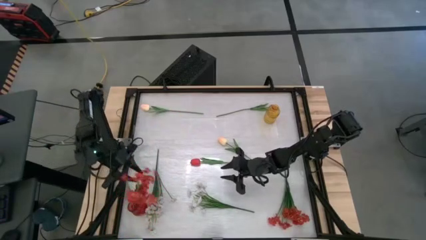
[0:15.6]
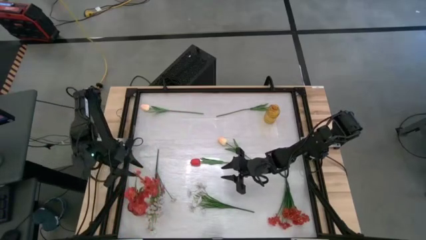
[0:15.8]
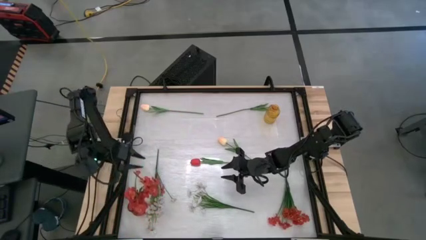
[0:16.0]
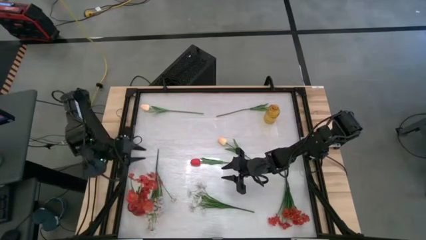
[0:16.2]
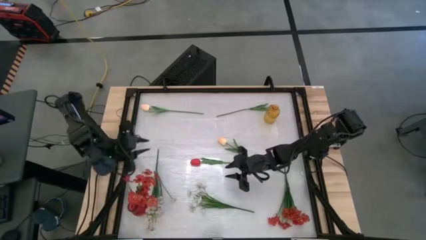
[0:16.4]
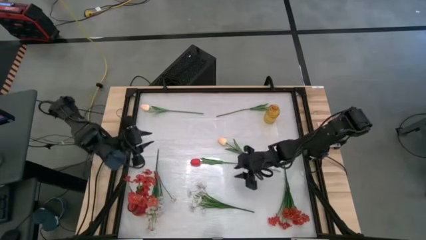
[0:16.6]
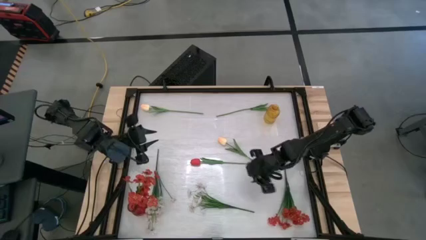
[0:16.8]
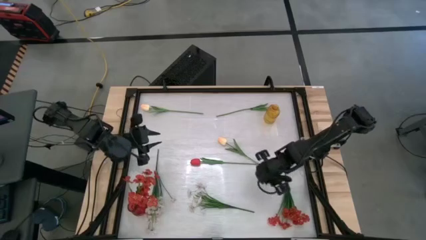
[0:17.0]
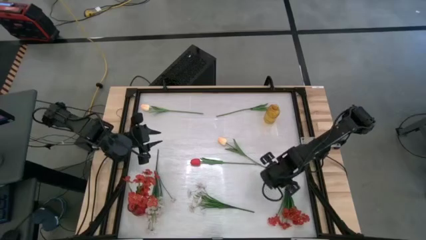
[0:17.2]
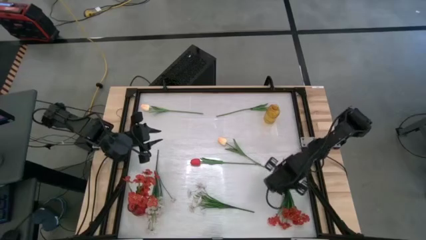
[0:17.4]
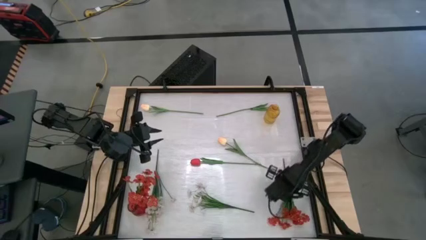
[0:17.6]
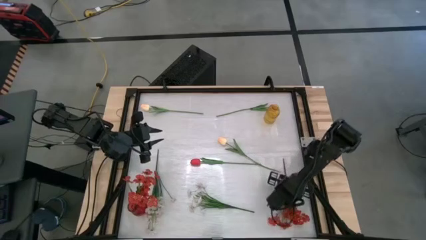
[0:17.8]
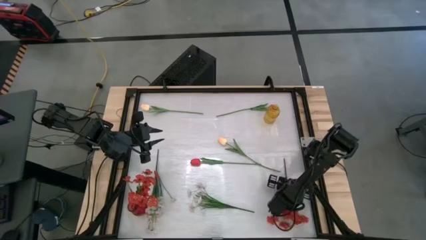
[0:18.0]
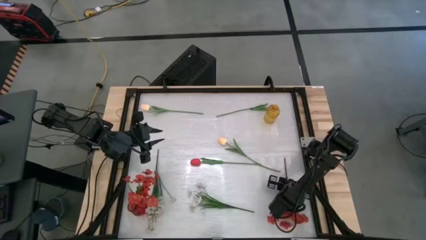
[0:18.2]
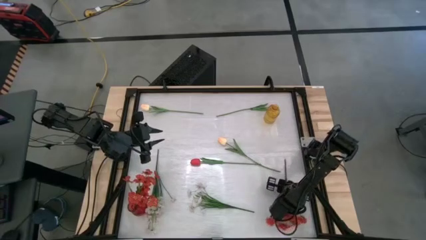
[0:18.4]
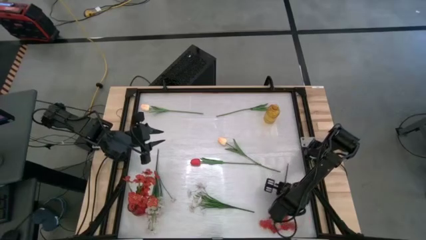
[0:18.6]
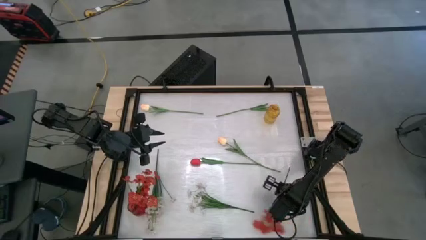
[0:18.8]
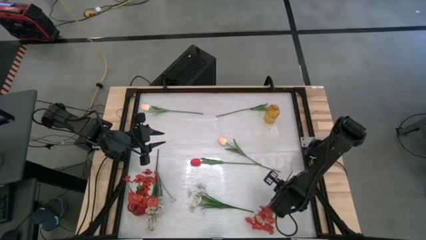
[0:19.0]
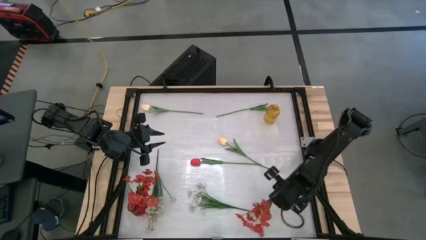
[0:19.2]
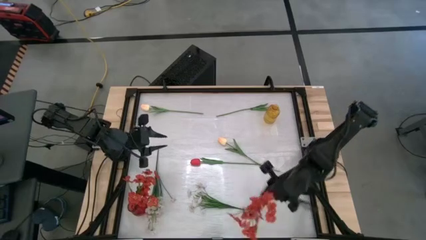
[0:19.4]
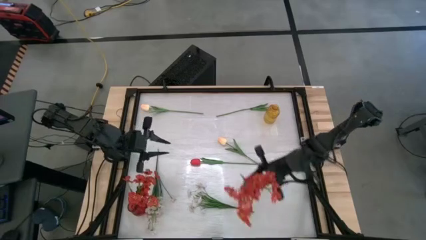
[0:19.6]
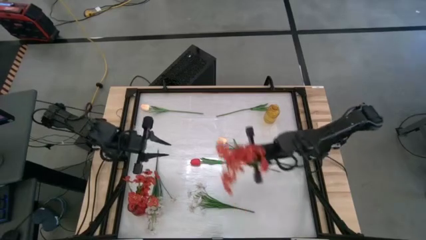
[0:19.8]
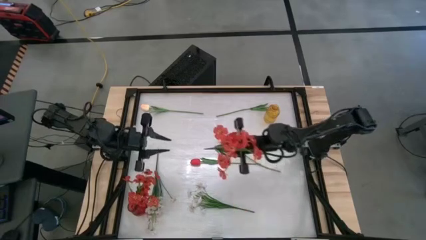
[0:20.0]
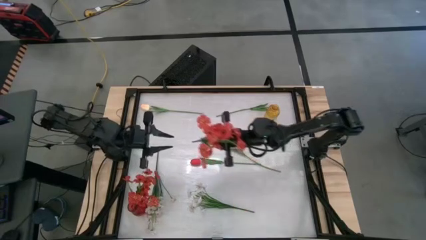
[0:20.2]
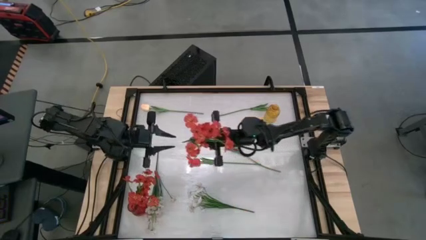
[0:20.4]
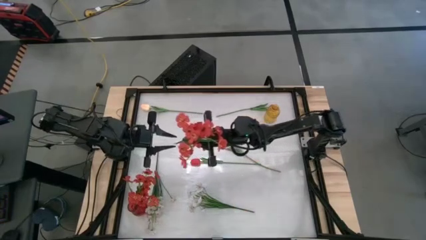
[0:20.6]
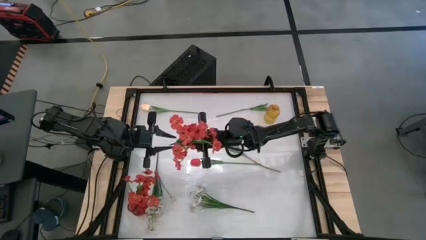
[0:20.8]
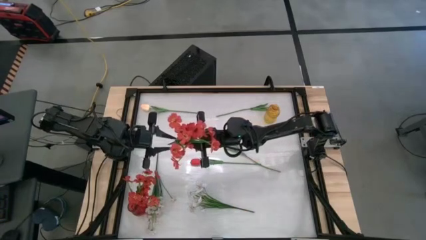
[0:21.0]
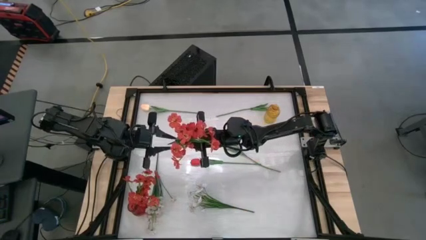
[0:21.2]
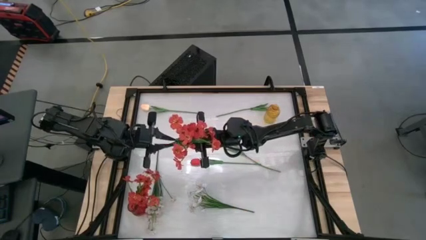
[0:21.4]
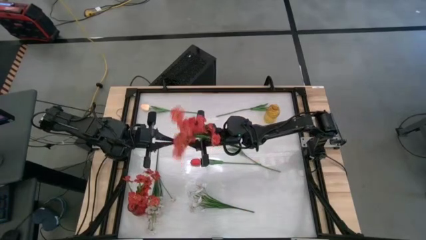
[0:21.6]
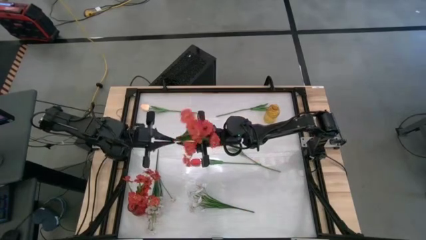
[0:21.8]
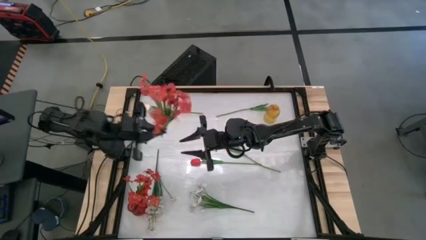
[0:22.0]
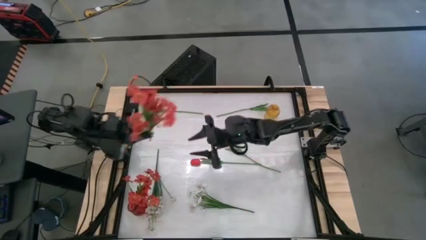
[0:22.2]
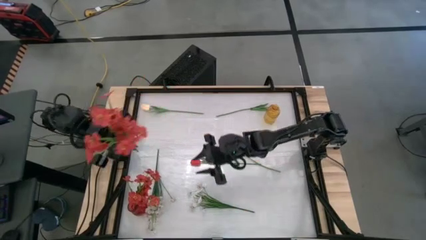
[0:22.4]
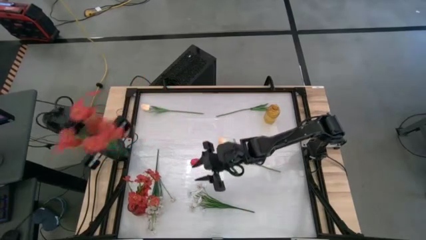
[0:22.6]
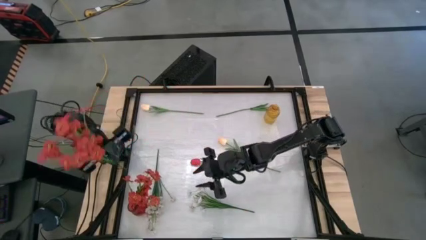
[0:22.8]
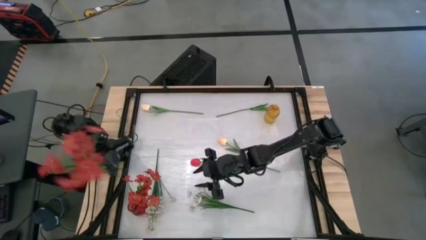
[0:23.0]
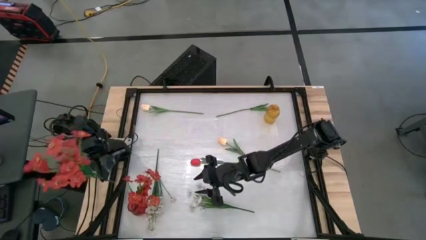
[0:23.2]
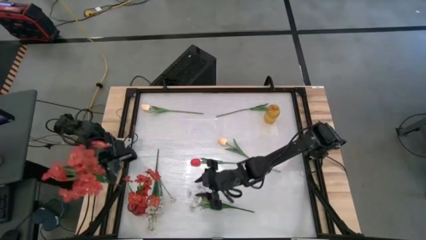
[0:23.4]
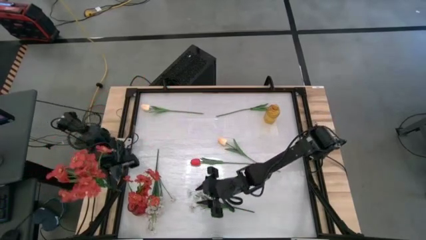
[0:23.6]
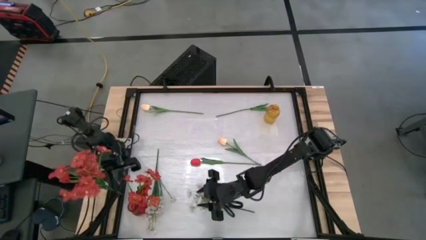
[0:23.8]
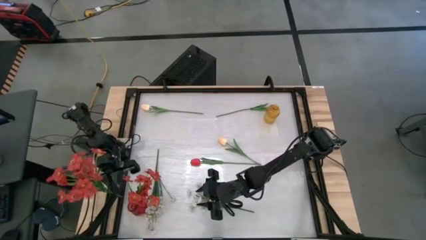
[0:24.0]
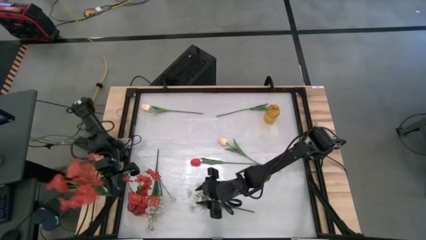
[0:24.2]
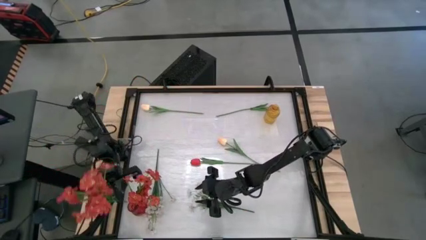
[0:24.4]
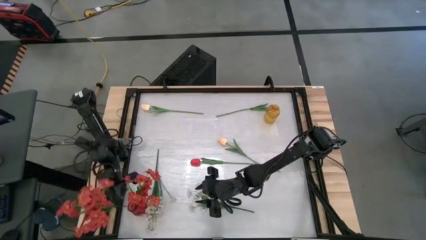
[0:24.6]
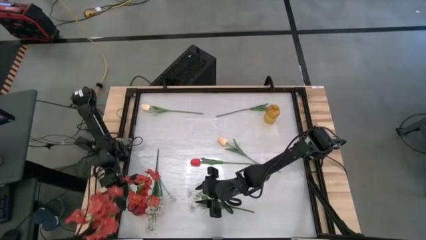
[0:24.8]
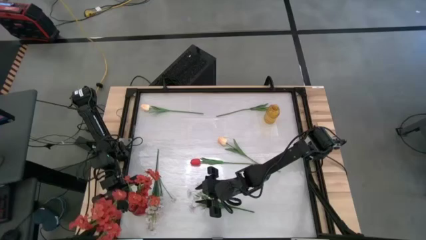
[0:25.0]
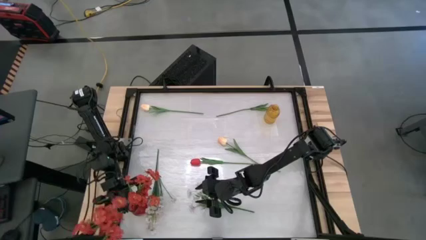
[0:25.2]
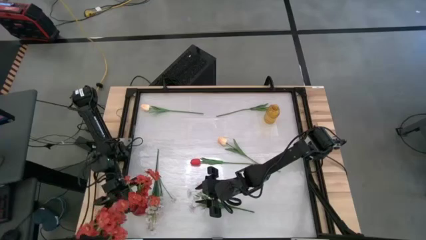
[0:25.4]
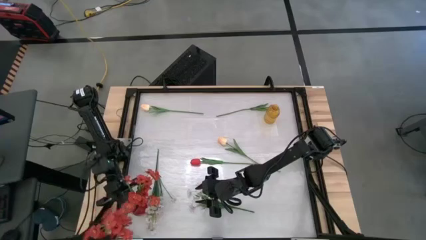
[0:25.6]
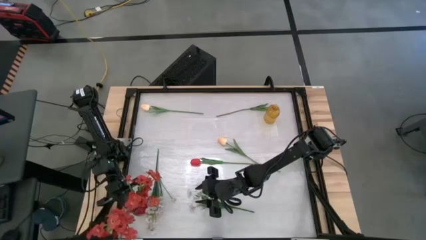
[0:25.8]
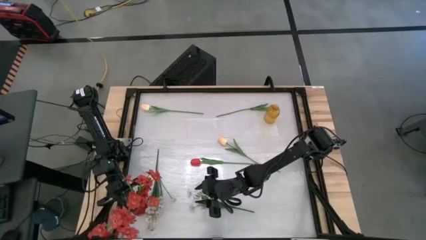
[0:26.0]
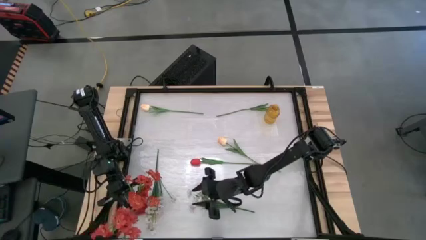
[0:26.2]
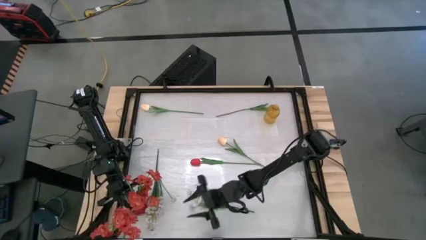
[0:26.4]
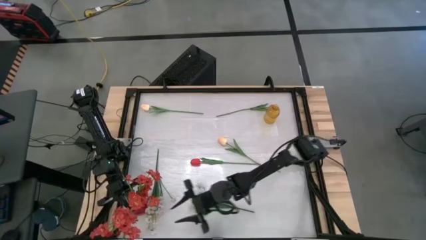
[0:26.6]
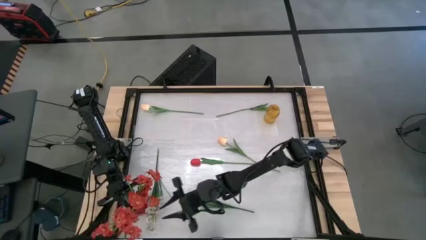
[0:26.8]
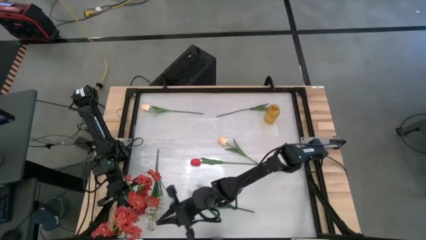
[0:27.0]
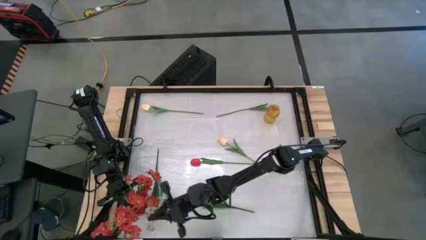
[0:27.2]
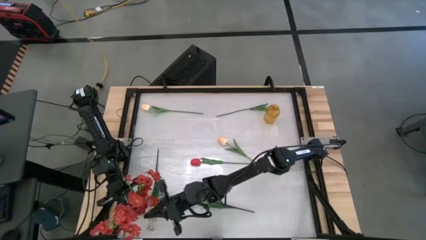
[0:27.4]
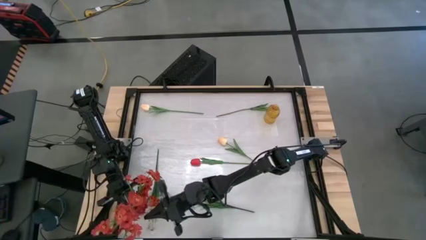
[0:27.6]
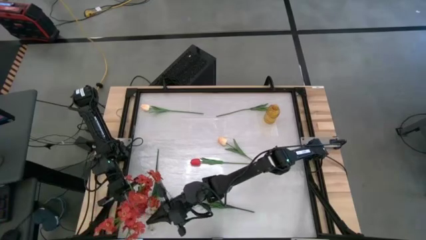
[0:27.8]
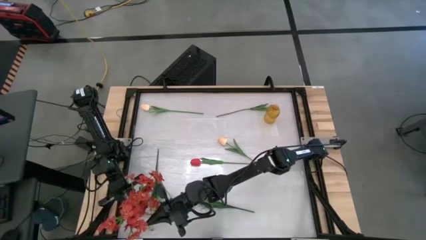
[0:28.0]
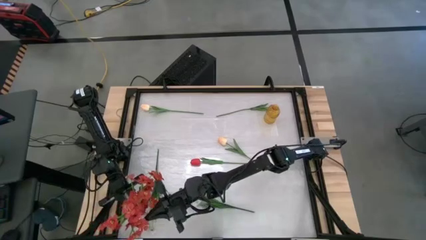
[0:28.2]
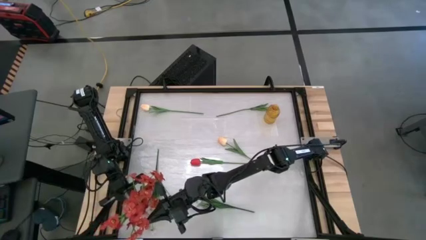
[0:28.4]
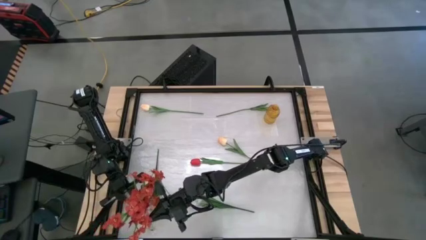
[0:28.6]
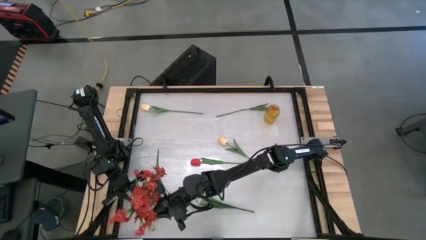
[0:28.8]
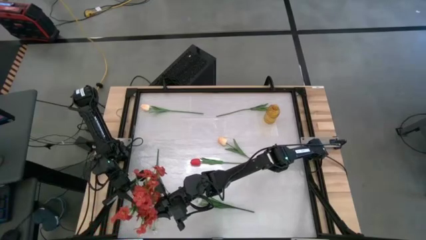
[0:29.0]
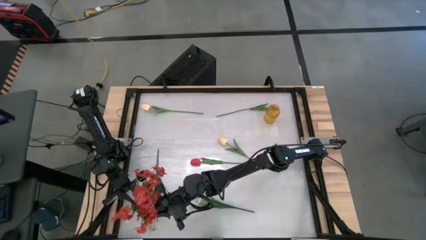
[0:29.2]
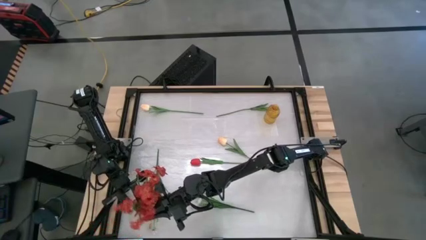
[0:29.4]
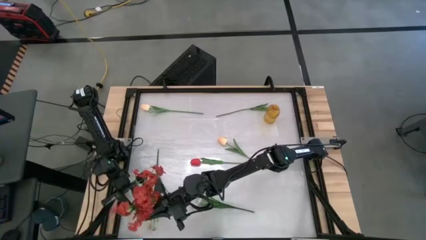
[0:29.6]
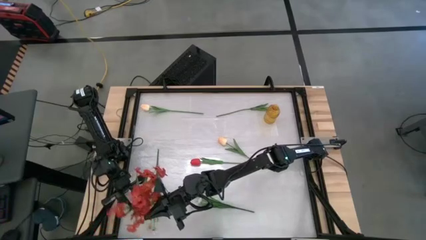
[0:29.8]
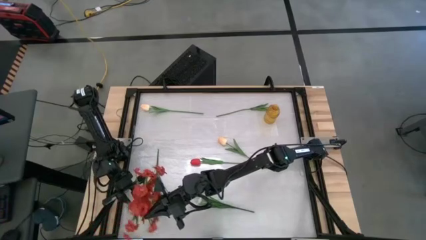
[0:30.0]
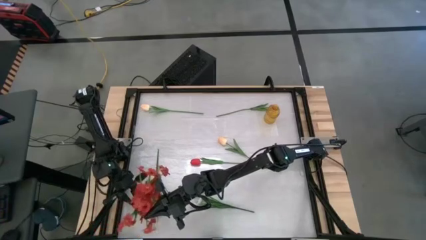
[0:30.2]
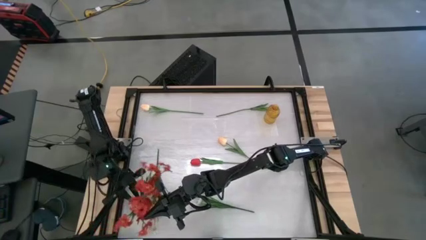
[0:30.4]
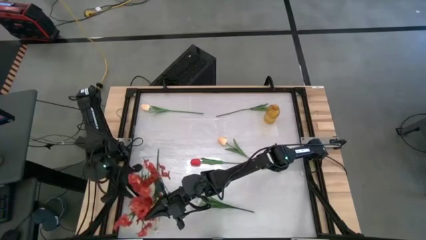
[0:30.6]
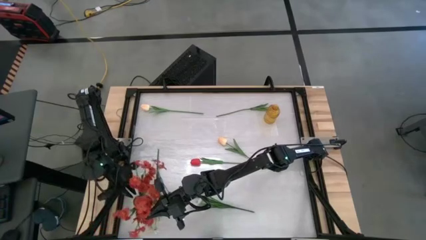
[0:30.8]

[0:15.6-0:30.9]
Task: Sort flowers into vase by color
Put the red flowers into the red vase
